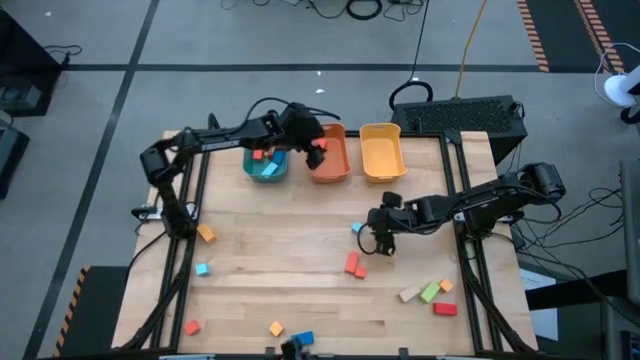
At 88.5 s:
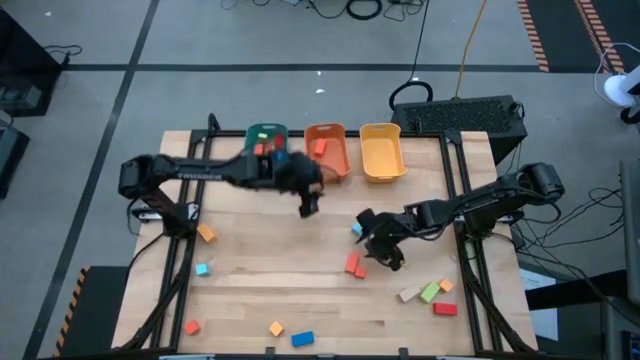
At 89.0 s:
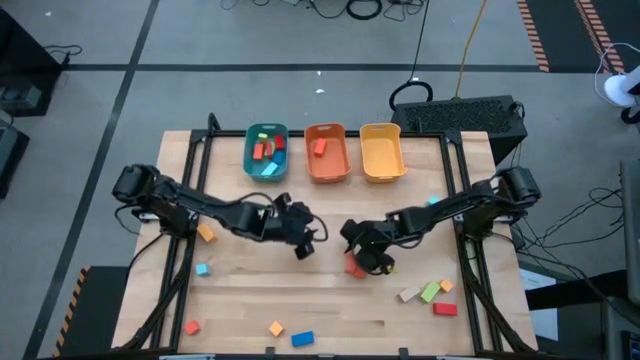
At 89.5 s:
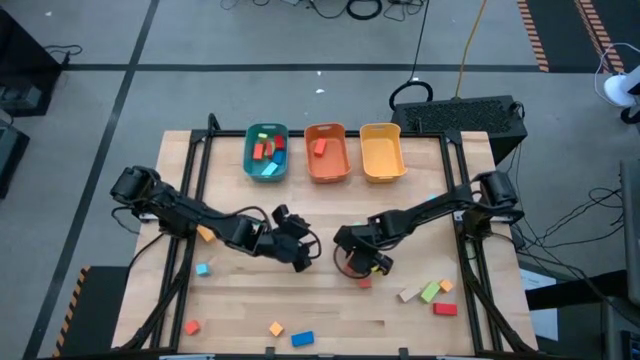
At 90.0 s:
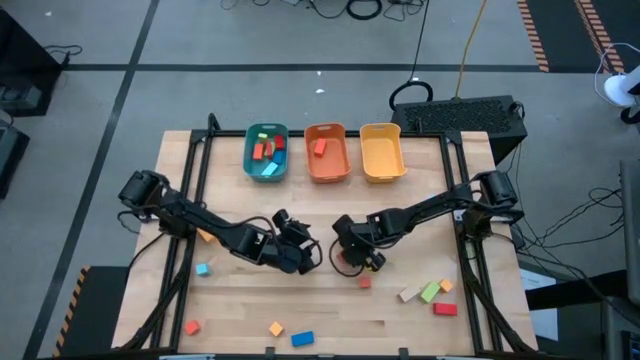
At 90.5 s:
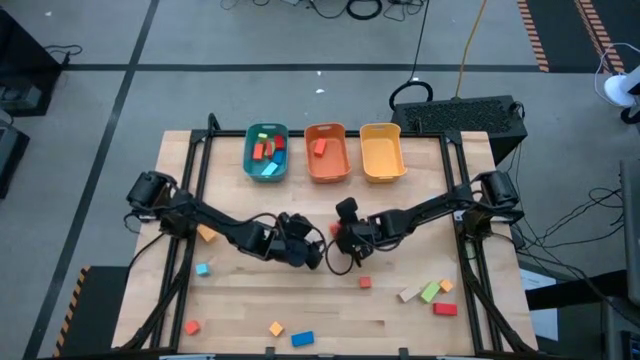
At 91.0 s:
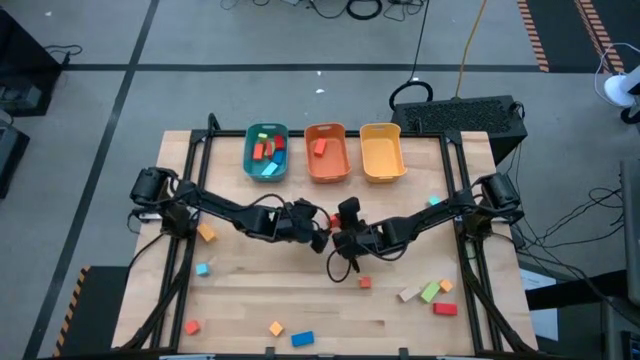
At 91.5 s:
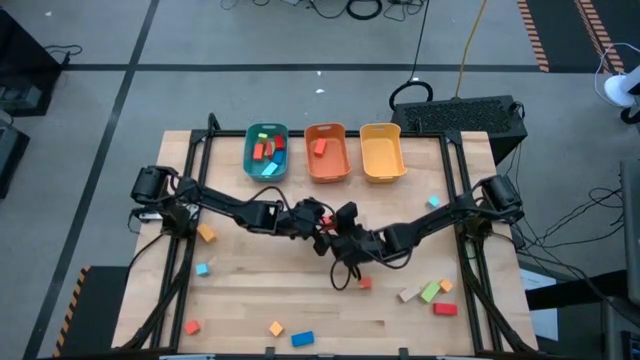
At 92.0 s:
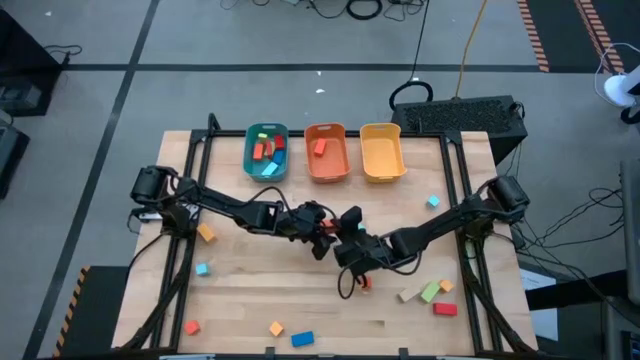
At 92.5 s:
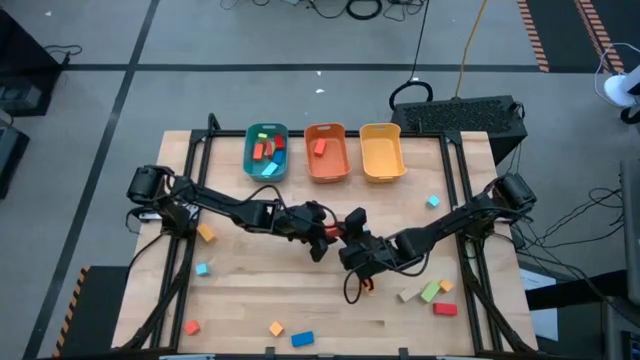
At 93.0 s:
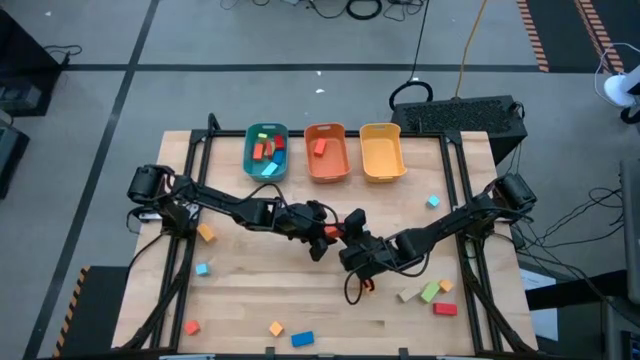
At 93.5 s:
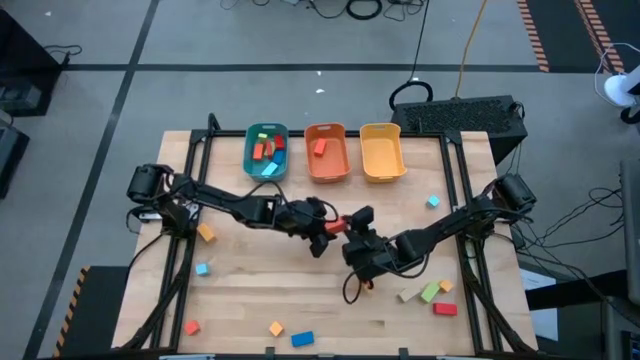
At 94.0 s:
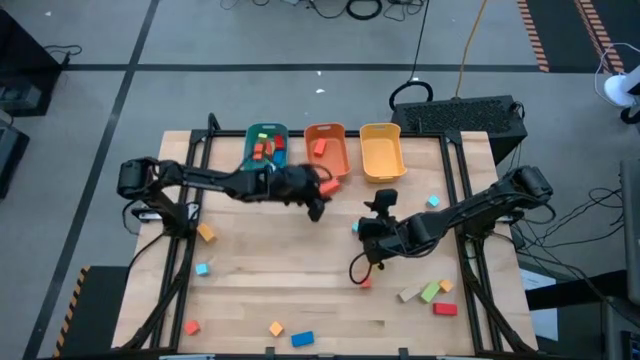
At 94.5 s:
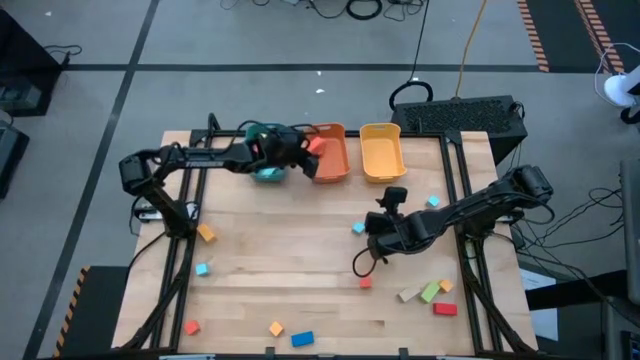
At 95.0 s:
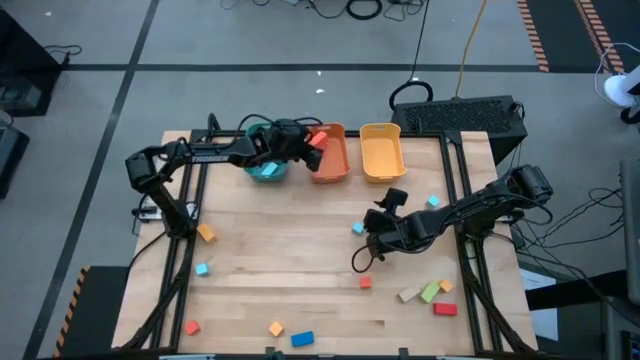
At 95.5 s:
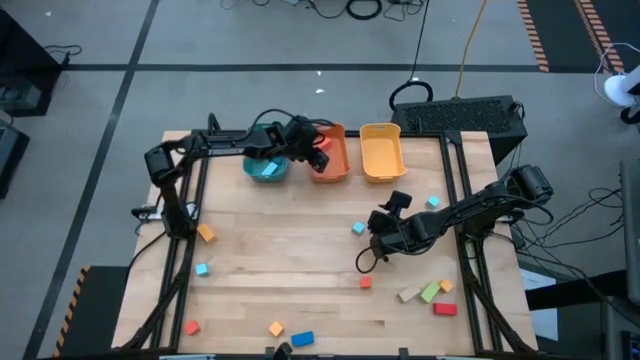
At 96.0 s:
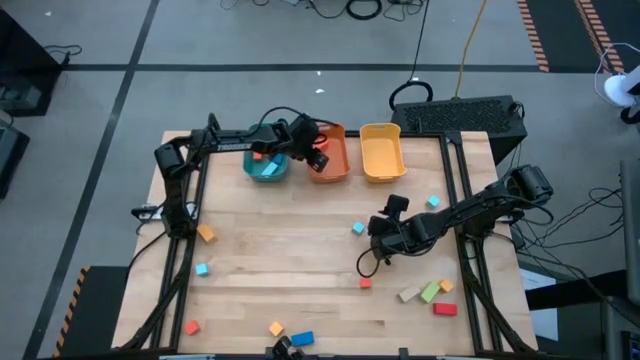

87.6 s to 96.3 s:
Task: Sort blocks by size
Put the orange thick rectangular block into the orange bin

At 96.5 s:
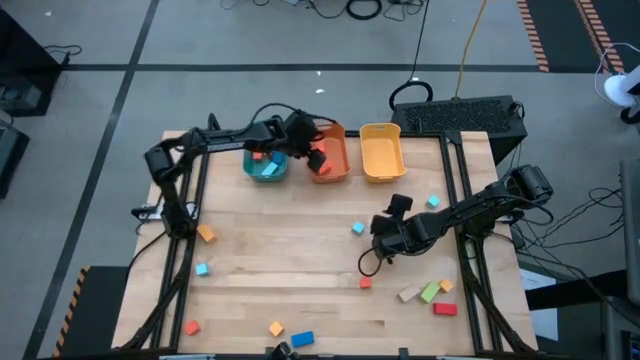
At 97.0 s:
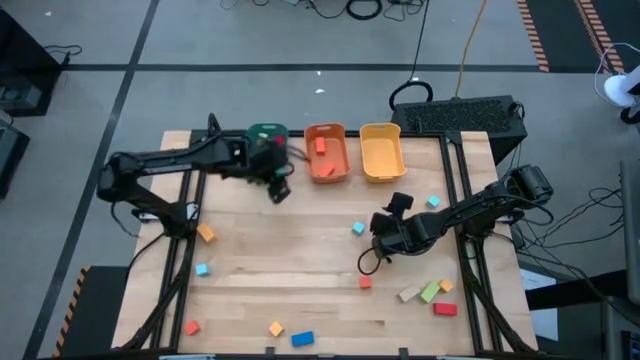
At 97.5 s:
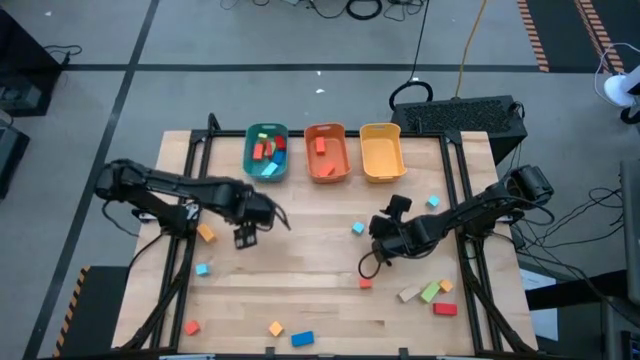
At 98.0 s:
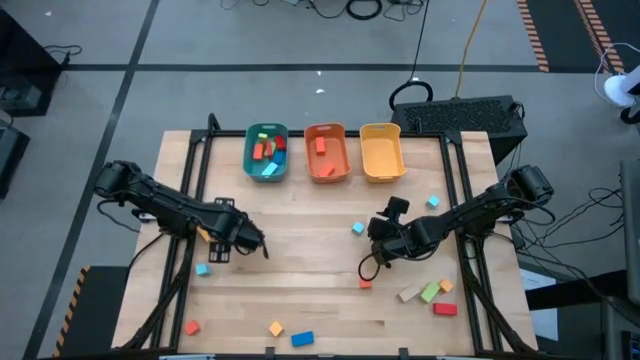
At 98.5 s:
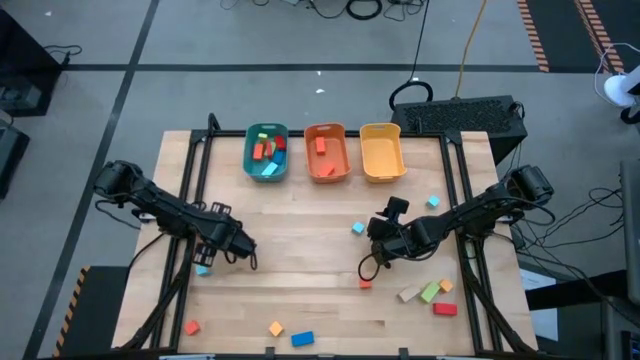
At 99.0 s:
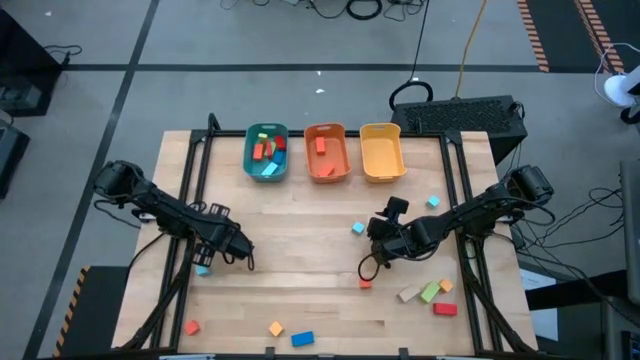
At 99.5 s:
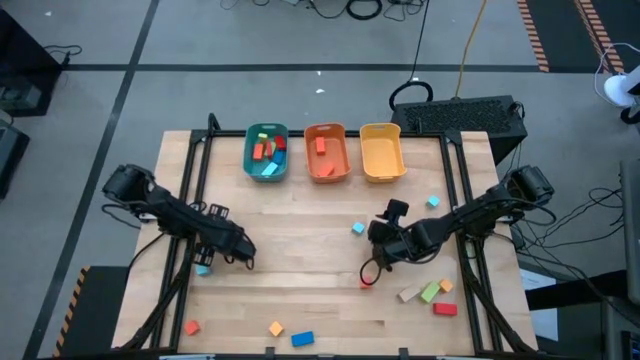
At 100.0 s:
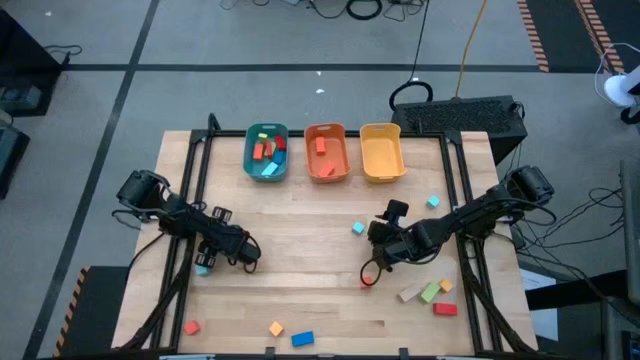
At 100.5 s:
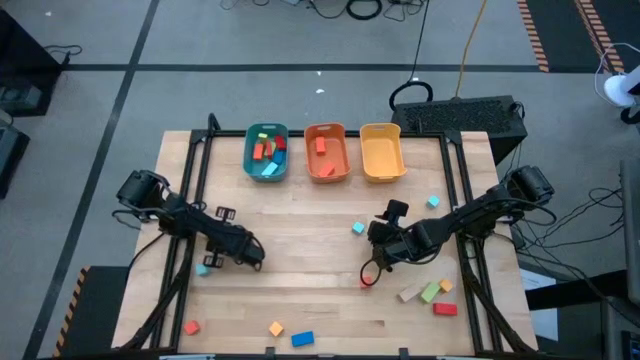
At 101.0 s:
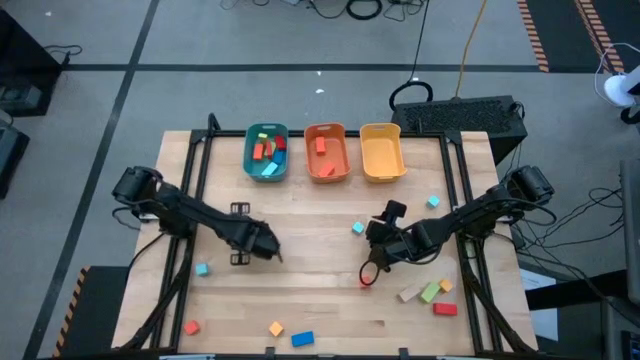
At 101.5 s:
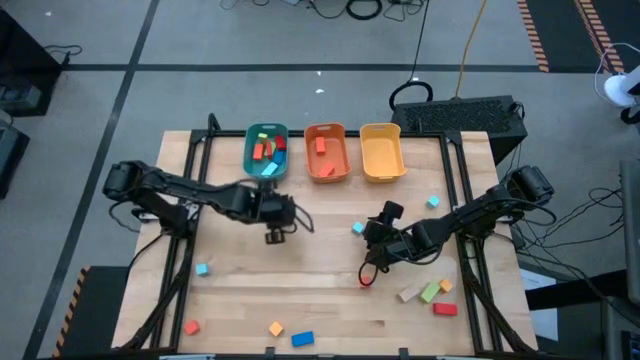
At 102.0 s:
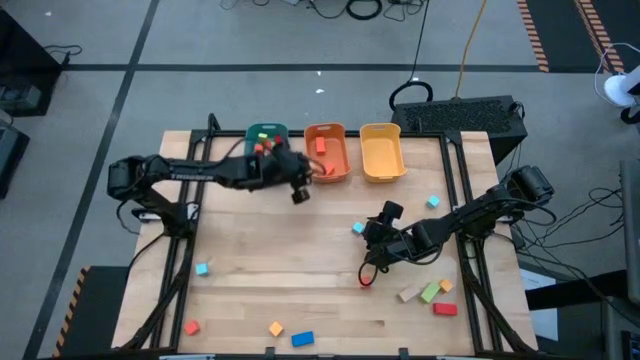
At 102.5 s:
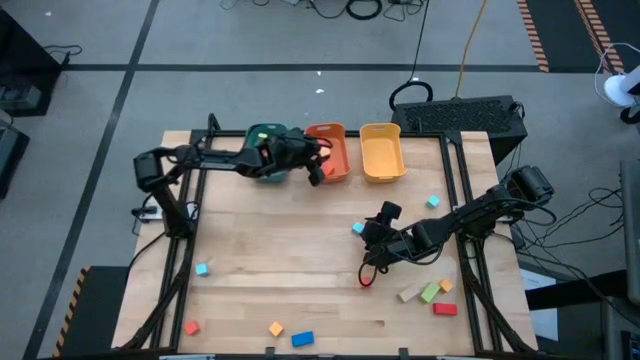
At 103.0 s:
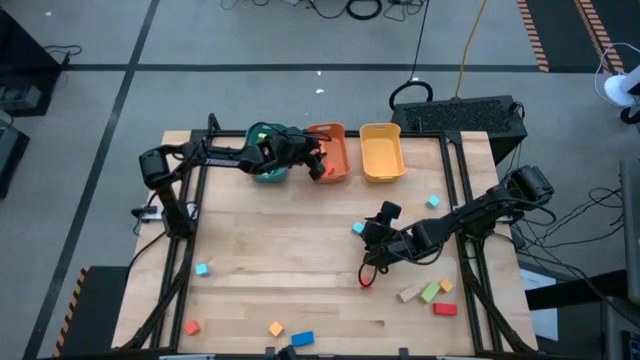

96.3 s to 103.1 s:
Put the yellow thick rectangular block into the orange bin

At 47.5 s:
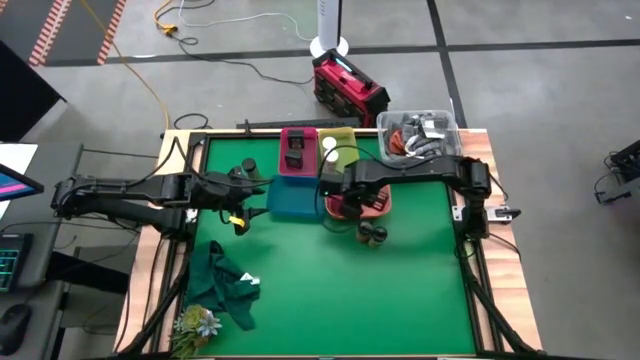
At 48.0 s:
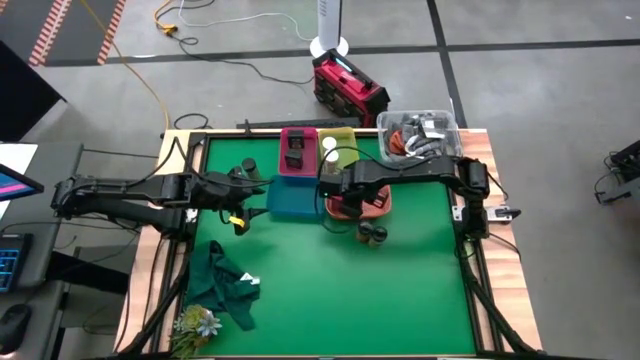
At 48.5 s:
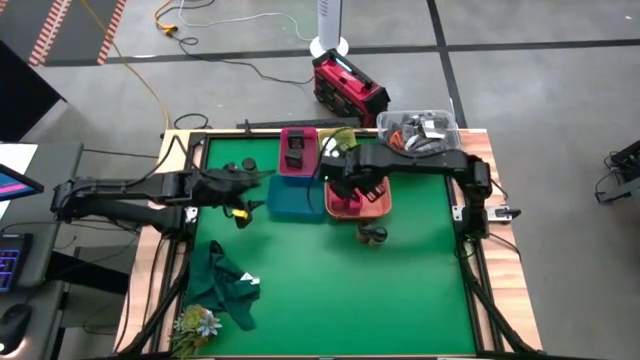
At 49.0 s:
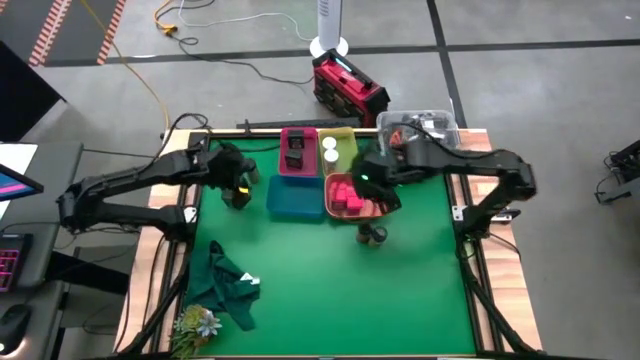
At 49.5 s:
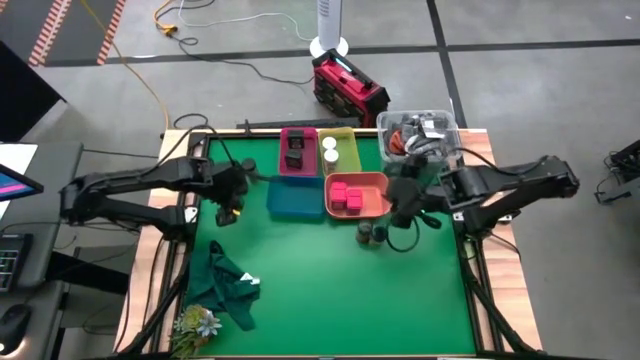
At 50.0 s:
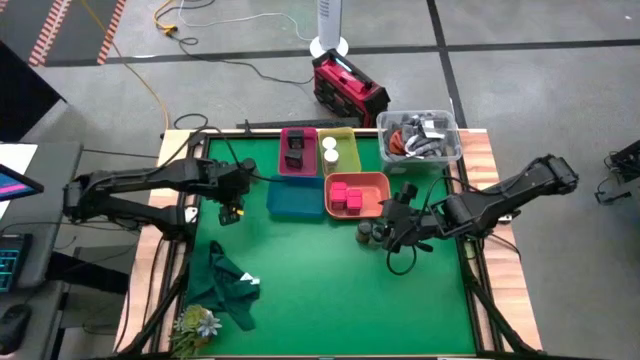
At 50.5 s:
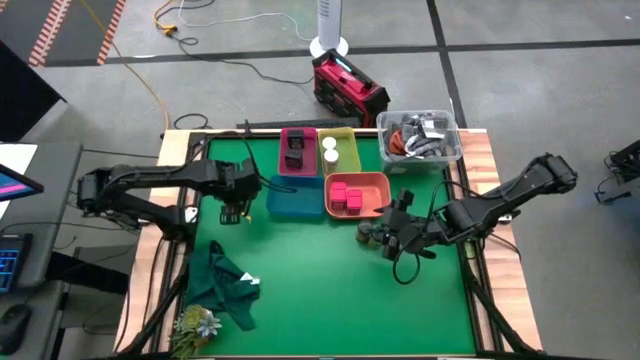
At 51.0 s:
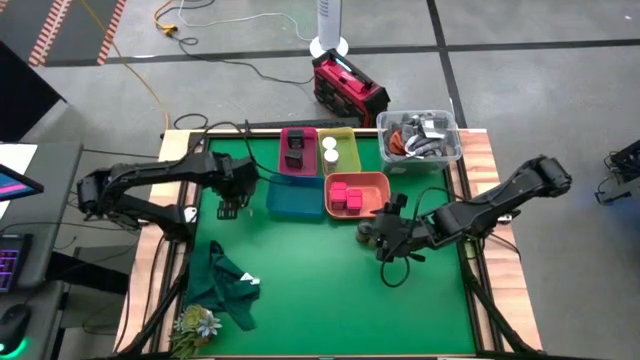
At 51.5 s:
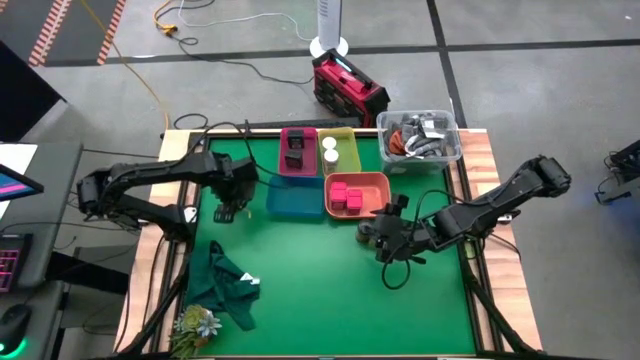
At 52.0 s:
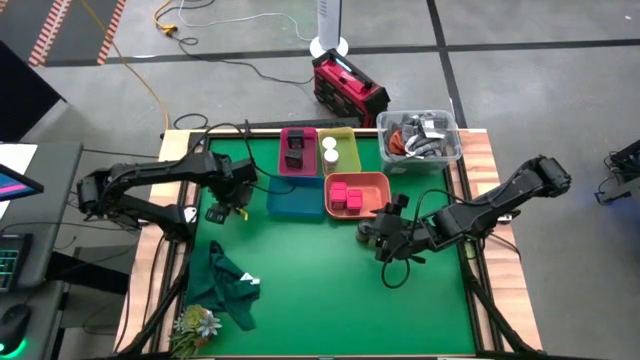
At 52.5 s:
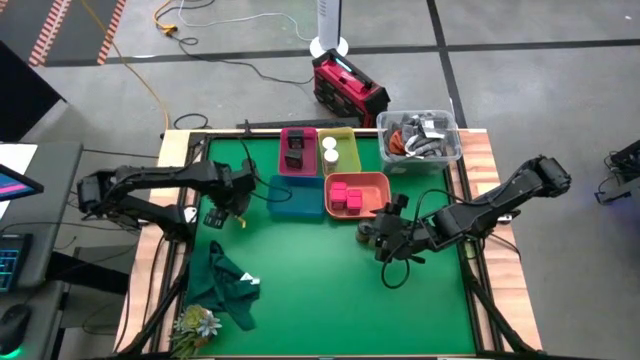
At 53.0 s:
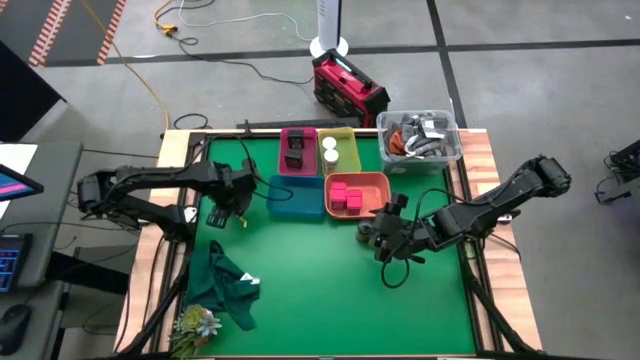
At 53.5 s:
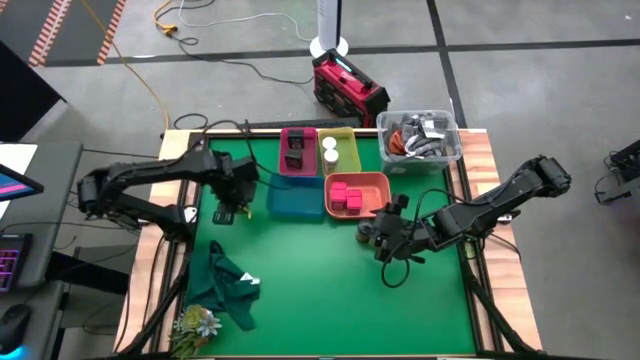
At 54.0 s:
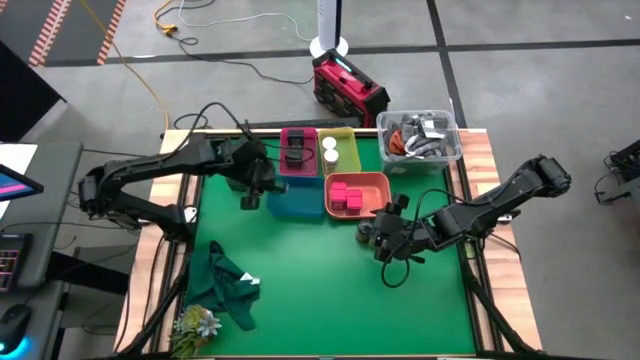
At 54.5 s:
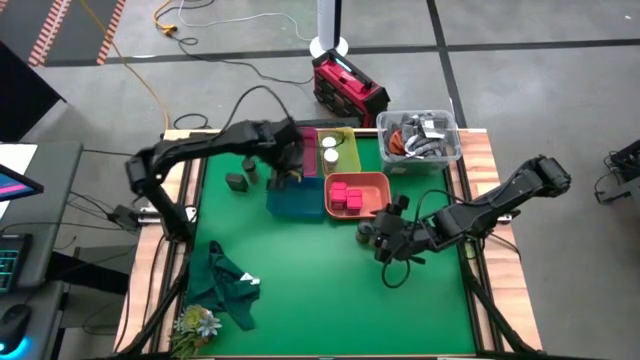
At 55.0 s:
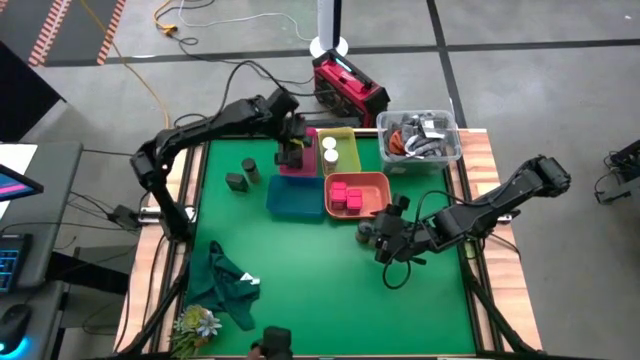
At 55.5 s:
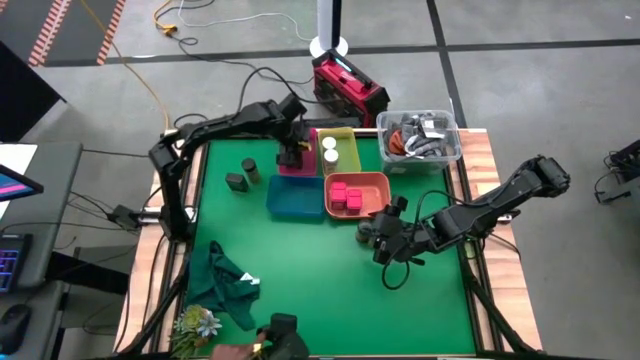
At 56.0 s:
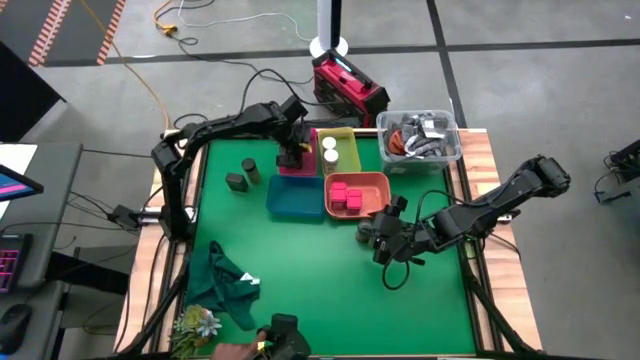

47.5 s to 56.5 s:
Task: Sort spices by type
Put the bottom black seasoning can into the red bin
